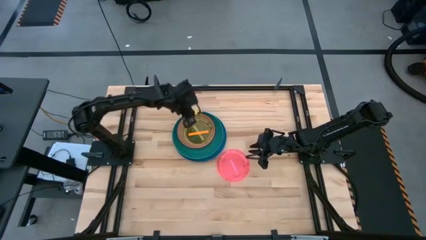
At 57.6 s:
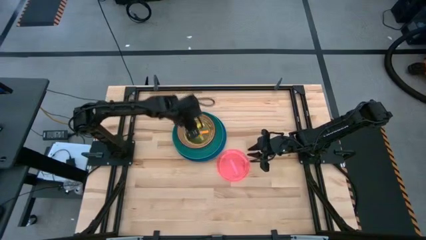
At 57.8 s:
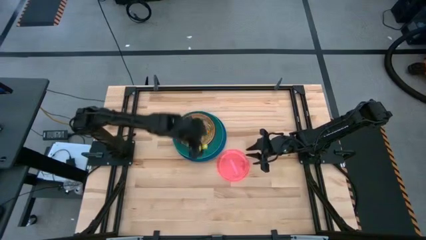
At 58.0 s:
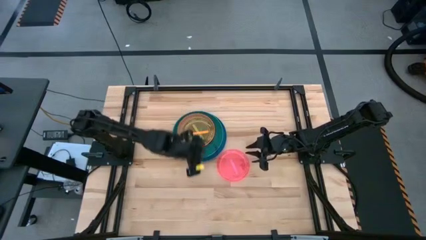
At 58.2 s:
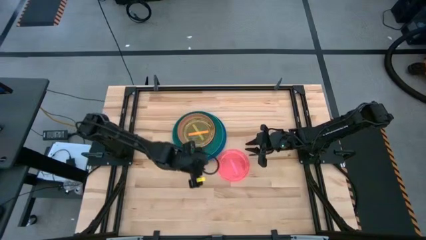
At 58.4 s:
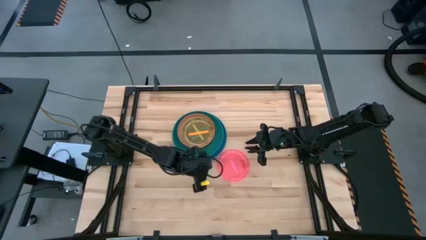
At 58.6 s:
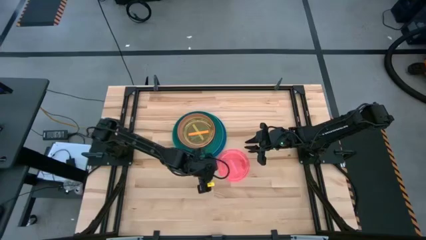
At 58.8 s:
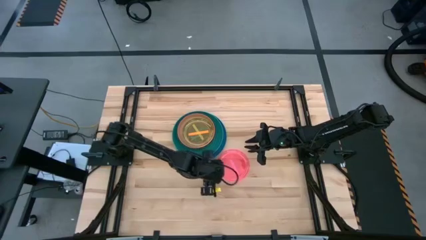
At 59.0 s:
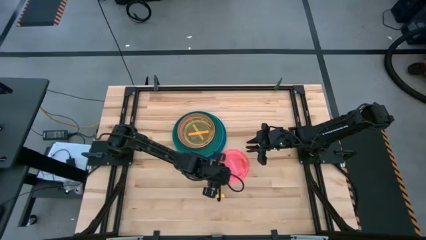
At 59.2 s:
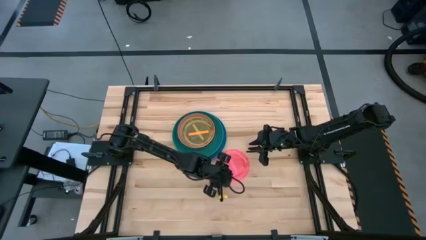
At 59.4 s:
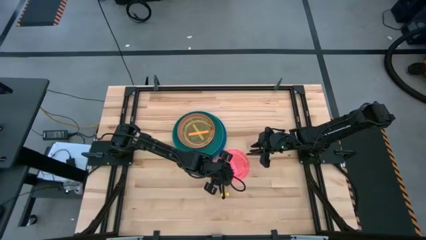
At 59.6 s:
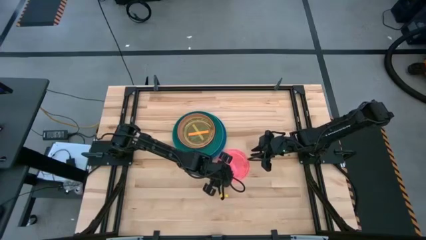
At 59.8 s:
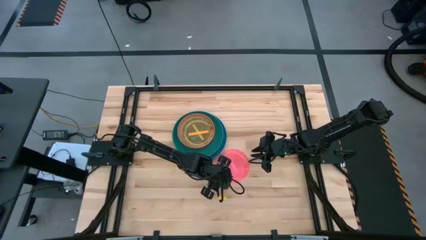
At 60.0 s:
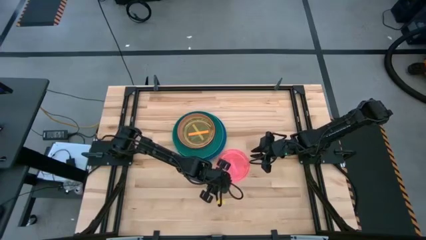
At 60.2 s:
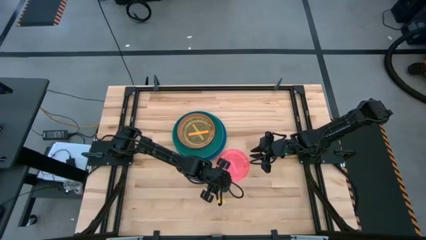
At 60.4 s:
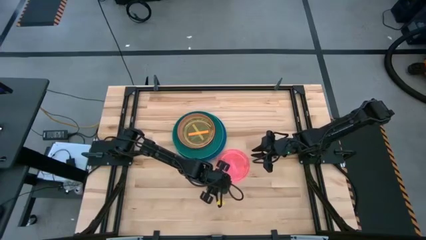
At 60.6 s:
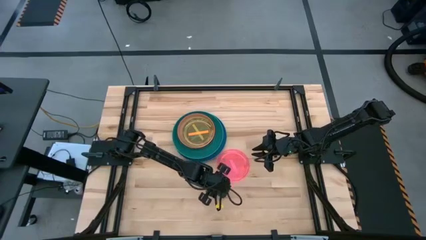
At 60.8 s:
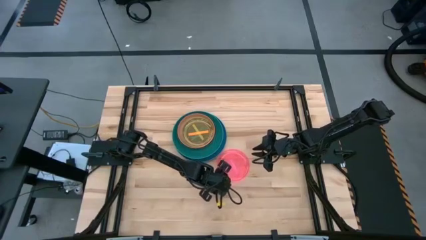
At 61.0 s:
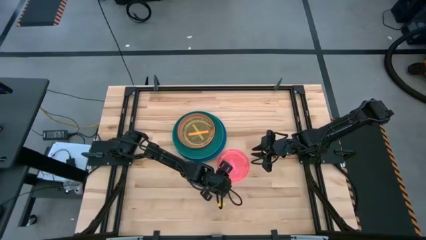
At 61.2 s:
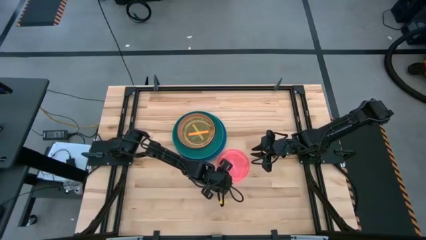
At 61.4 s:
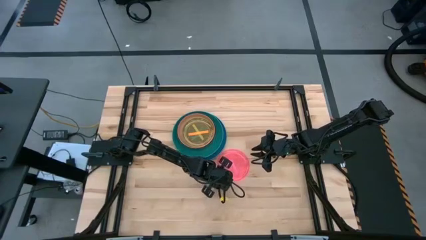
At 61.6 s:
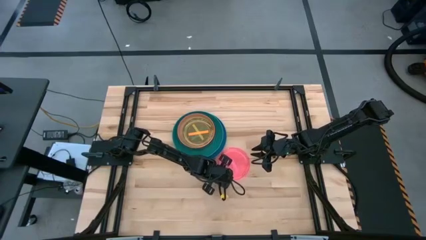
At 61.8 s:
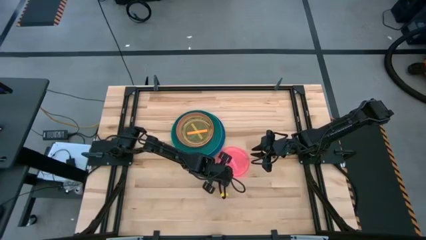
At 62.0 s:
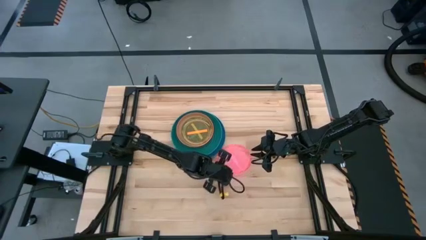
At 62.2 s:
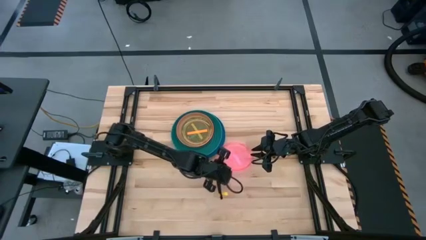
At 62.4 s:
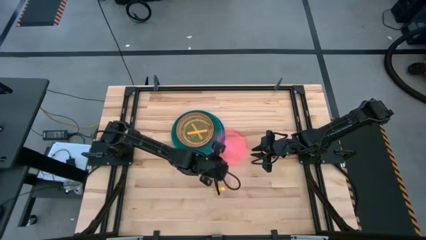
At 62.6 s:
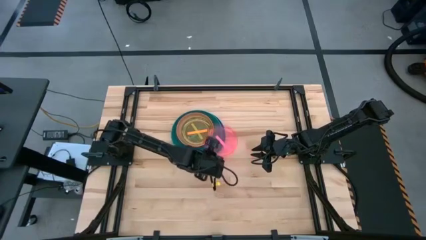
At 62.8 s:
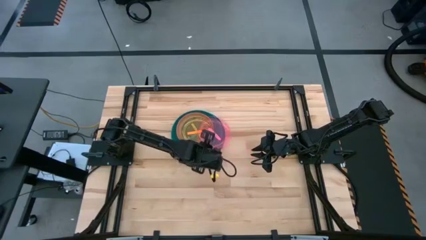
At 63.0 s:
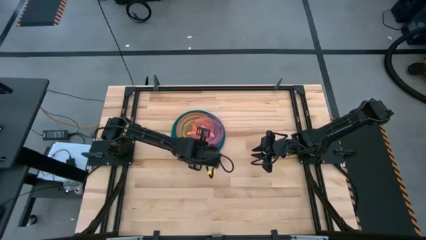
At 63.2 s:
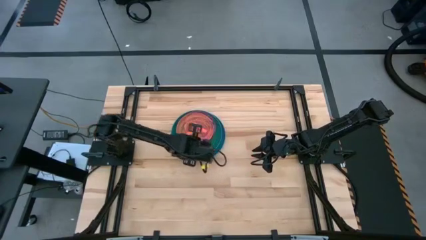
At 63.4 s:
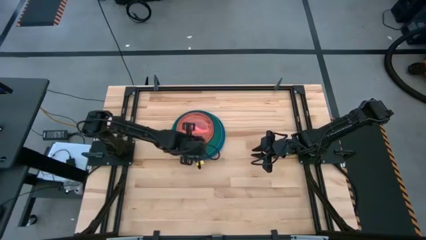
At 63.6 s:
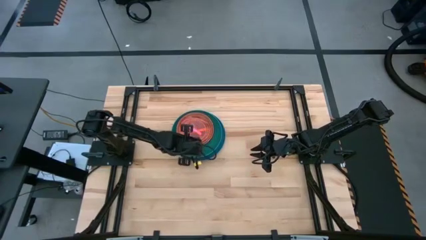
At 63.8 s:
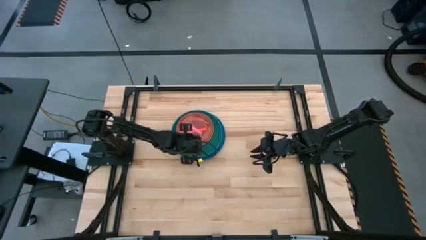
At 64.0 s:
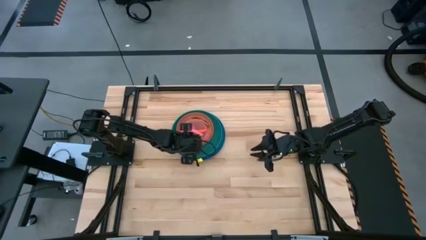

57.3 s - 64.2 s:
Task: Stack plastic plates
Stack the transparent pink plate on top of the transparent orange plate

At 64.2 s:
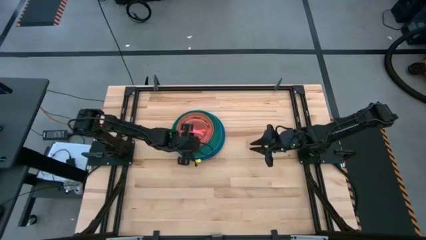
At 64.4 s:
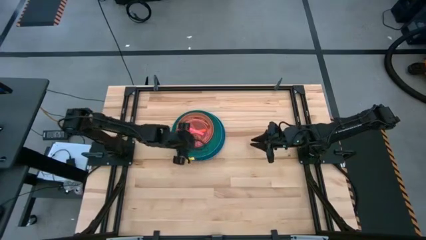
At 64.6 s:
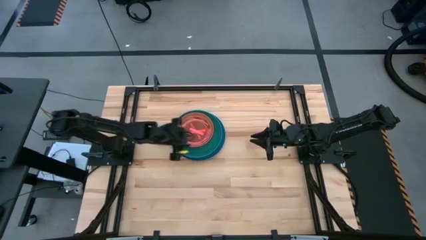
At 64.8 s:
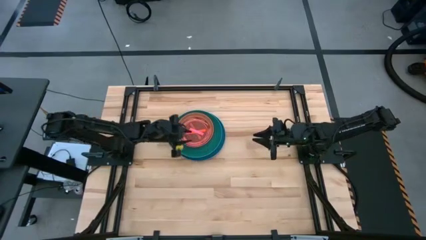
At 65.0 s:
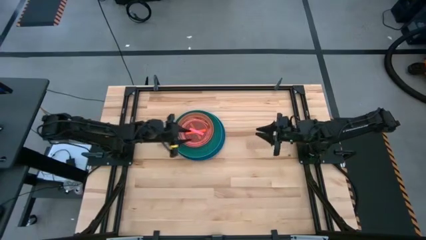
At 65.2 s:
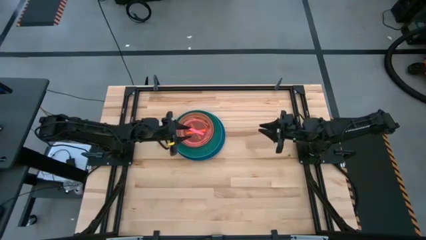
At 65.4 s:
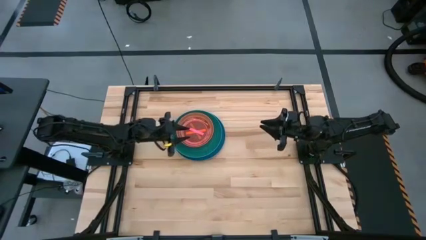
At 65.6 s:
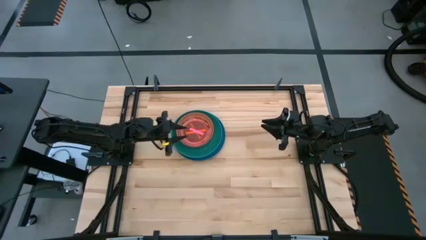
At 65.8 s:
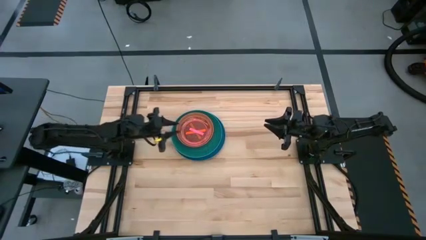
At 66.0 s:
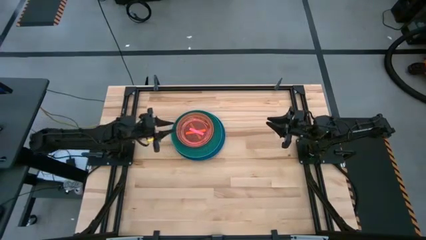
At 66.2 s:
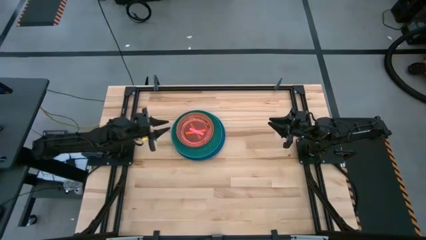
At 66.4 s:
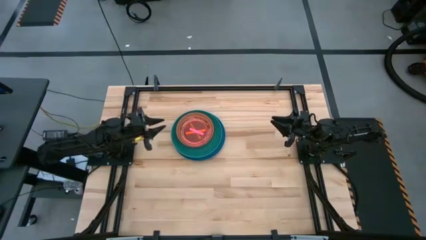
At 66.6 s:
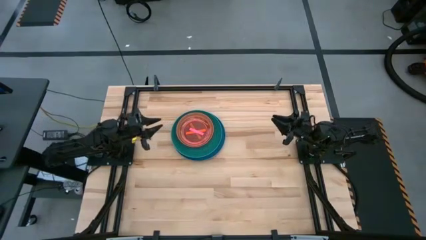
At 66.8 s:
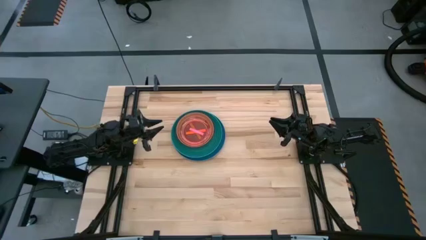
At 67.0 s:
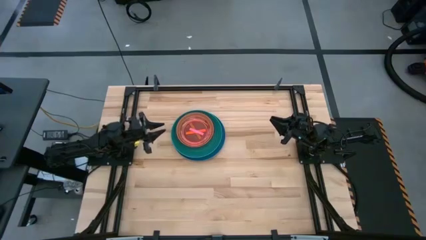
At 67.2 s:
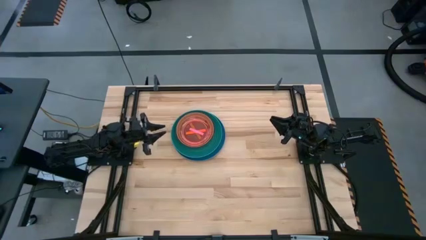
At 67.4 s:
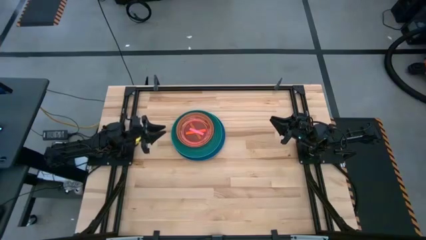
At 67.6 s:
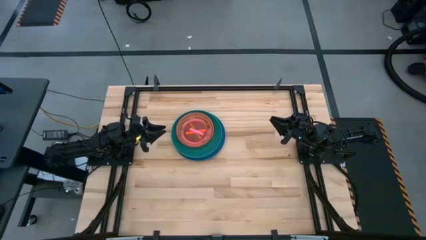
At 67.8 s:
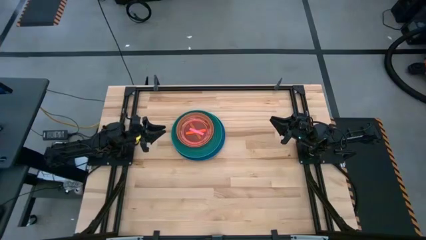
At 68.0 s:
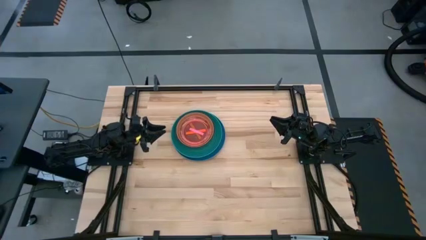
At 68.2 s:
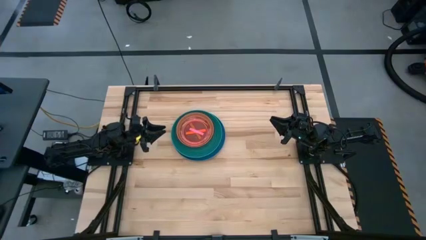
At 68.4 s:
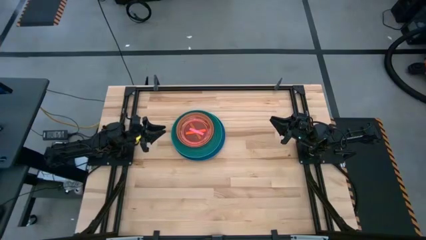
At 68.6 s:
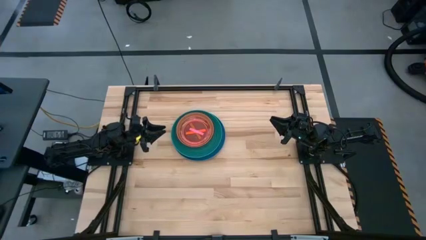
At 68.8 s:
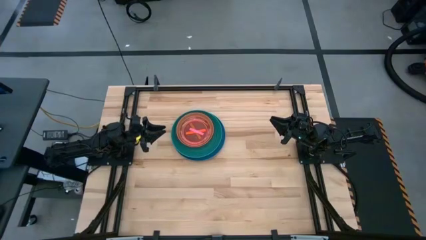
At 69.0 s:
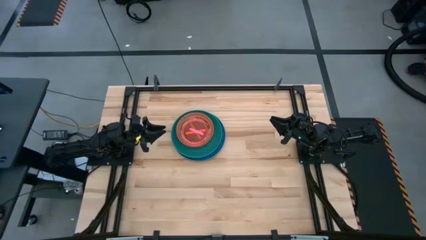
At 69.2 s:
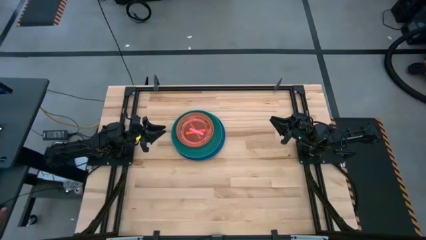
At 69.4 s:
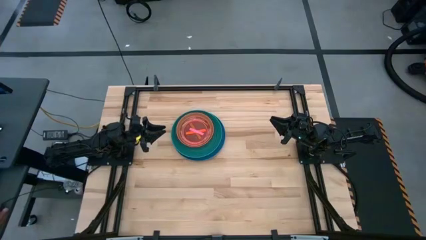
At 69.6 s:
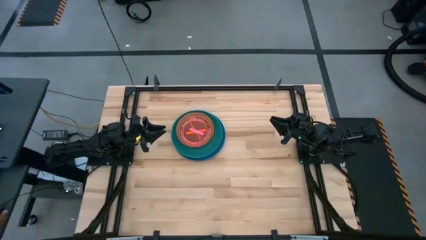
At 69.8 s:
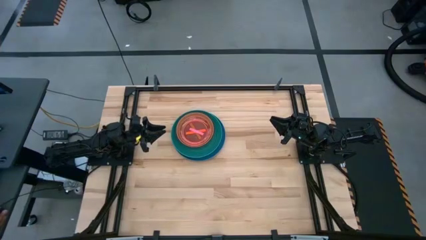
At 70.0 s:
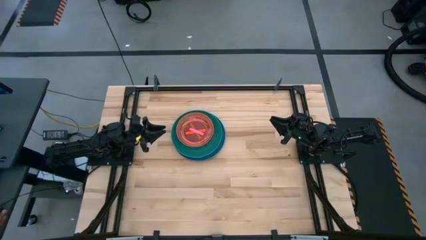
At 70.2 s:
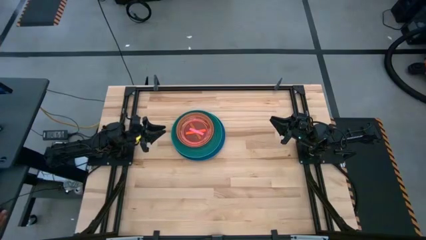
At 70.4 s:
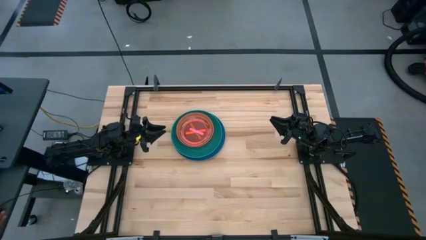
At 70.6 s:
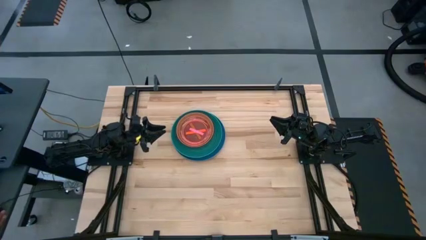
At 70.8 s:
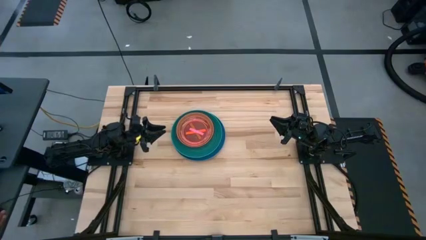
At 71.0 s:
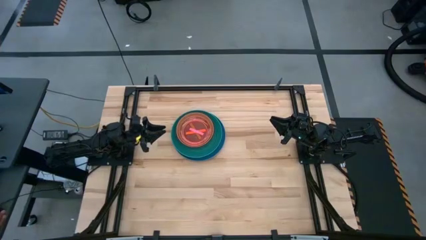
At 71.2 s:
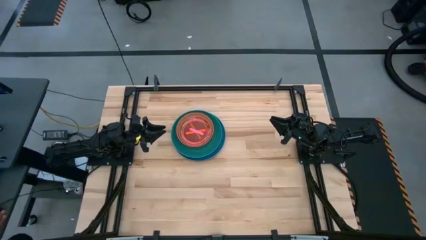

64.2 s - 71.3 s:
Return to Home Position

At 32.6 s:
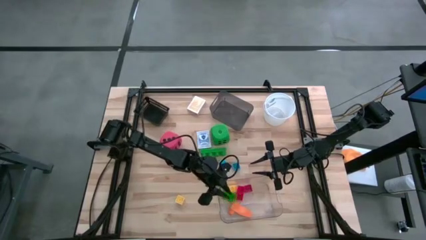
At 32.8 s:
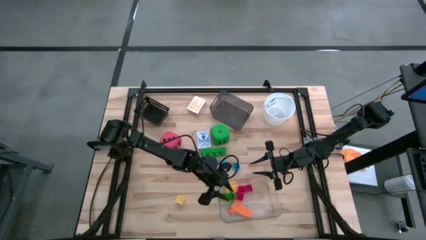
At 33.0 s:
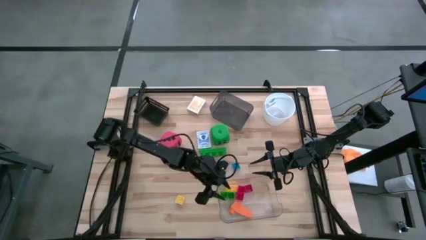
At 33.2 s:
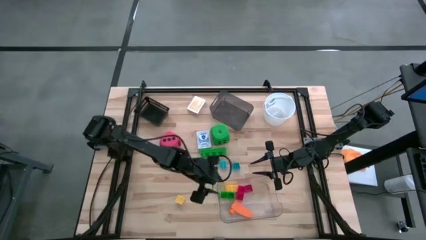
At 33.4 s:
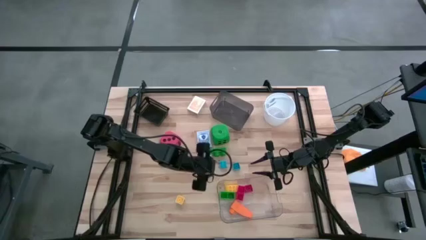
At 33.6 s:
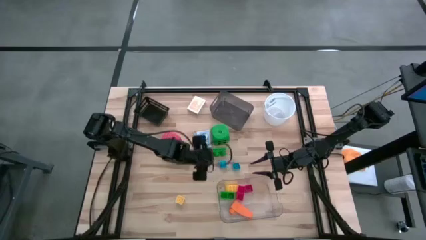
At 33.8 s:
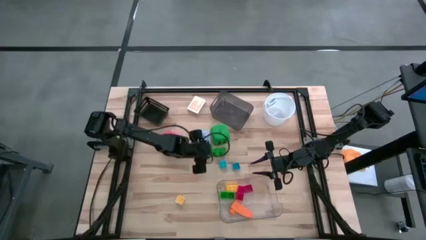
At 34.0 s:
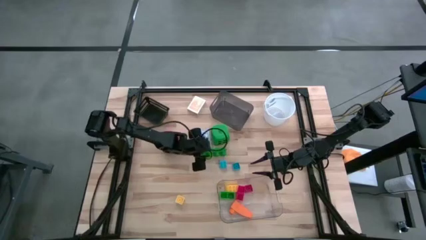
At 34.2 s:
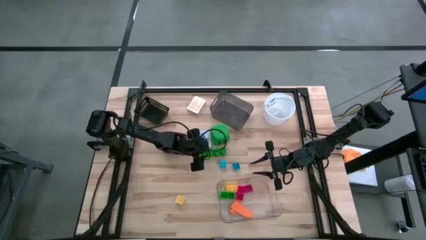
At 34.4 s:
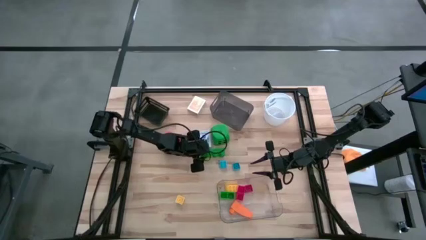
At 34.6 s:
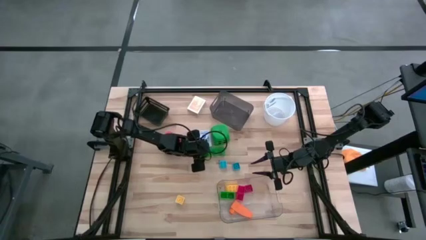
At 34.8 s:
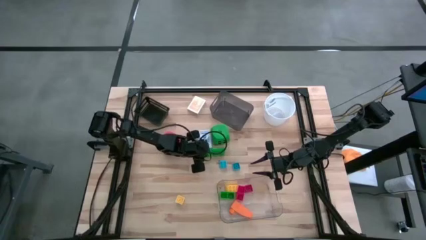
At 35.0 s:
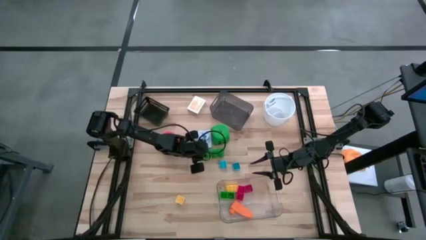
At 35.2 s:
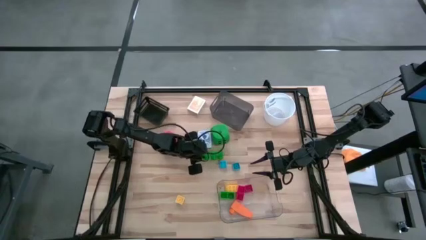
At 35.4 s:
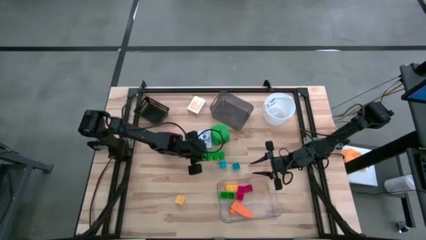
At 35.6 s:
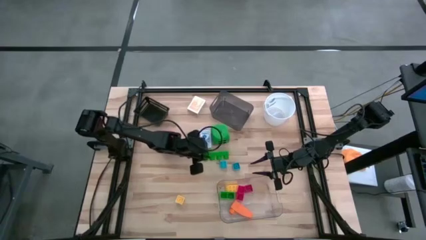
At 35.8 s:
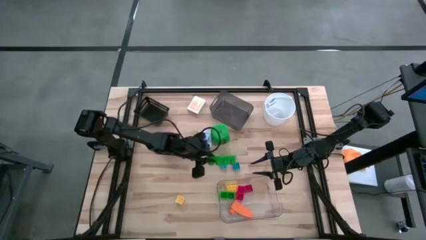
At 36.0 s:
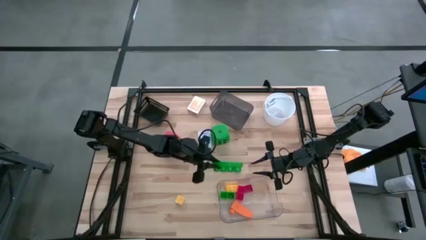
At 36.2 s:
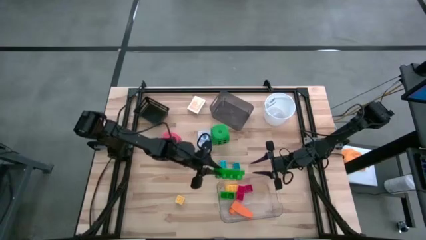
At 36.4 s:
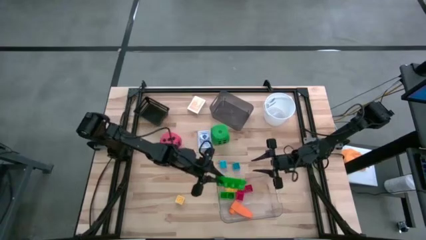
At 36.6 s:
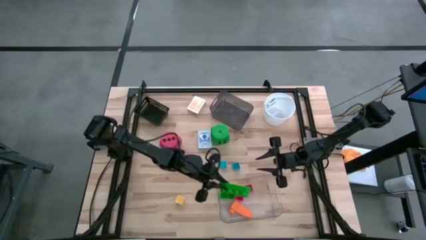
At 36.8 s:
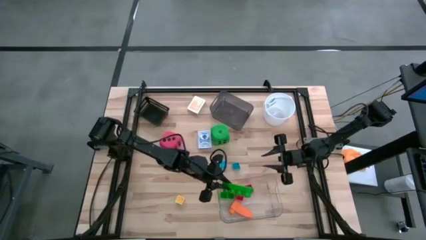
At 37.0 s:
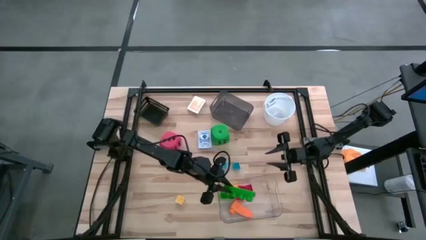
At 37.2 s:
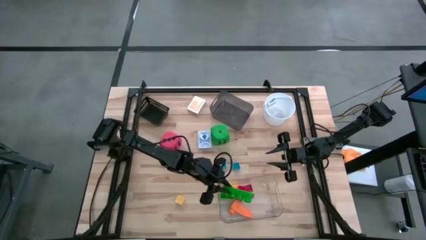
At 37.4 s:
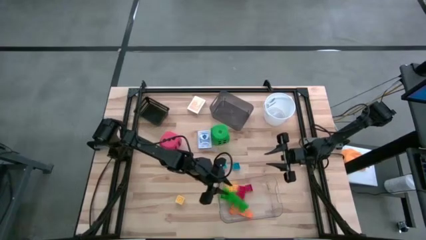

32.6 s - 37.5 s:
Task: Pick & Place Toys
Put the green game piece into the bottom transparent bin
